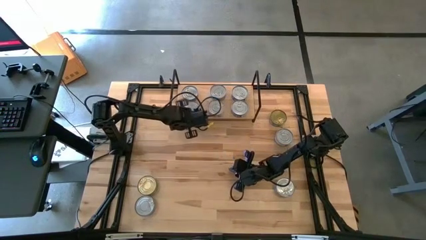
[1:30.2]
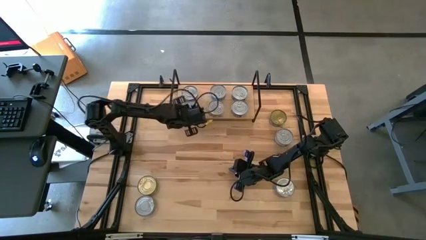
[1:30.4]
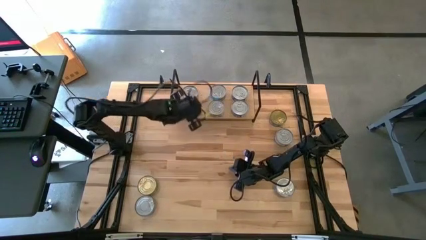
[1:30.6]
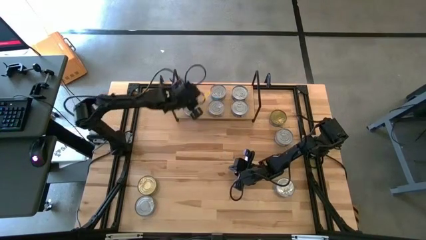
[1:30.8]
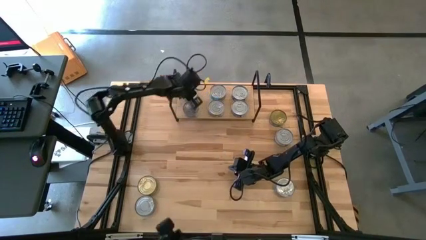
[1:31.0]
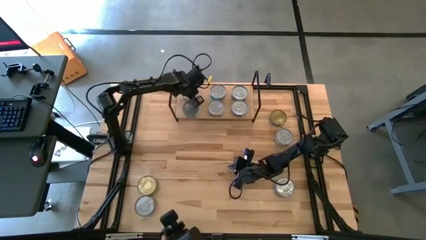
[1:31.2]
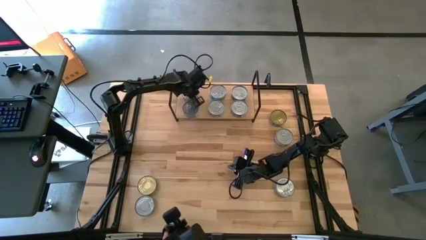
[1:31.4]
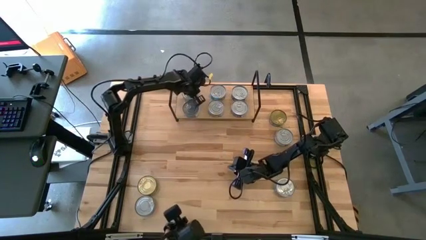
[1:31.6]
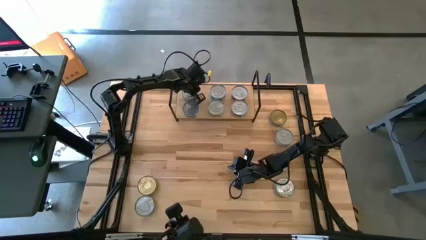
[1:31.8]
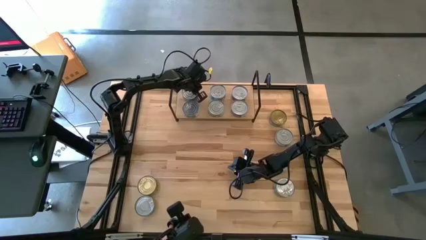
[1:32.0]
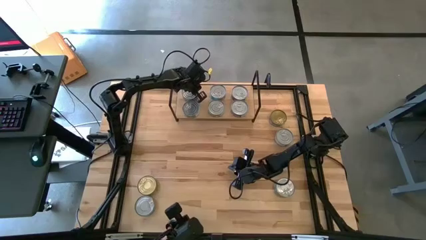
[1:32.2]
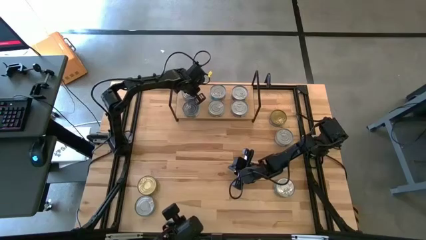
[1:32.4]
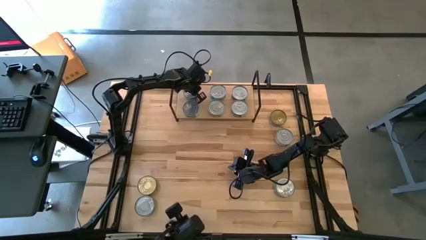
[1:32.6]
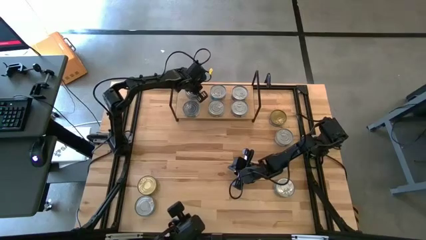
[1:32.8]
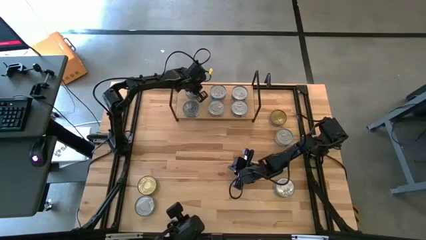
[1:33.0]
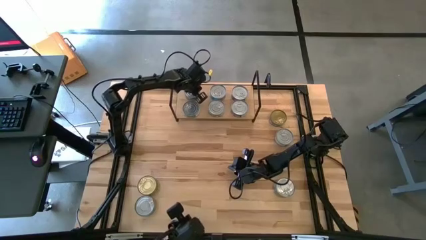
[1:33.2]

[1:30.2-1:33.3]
Task: Stack canned seafood by type on shelf
Adjust the green tuna can on the shelf

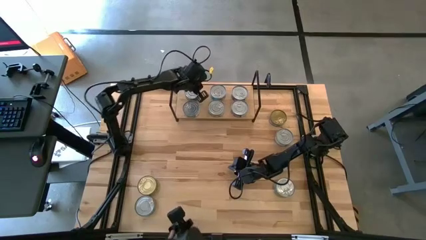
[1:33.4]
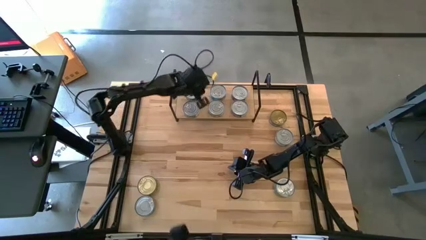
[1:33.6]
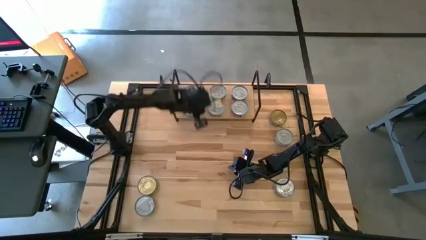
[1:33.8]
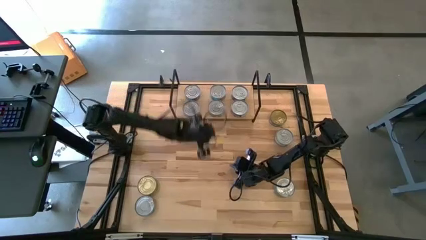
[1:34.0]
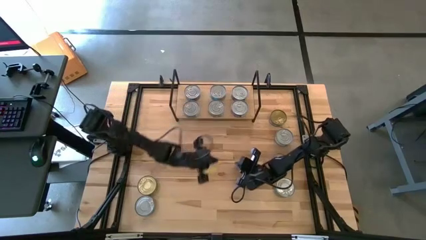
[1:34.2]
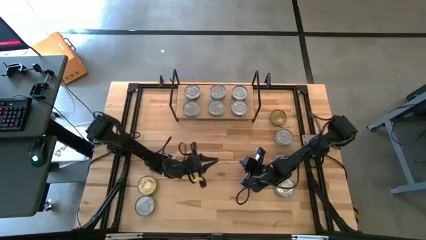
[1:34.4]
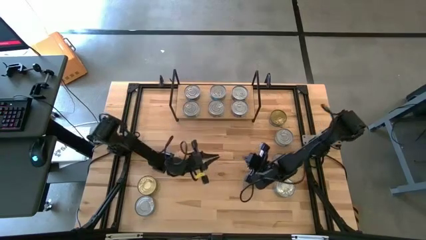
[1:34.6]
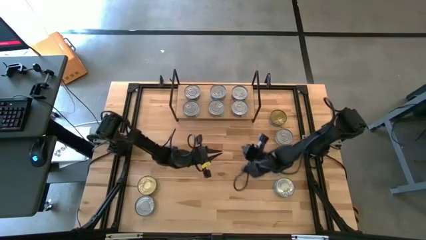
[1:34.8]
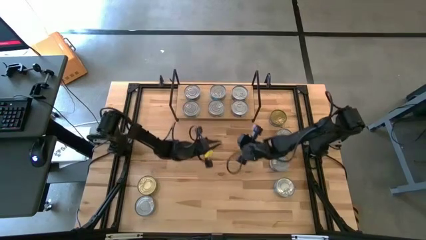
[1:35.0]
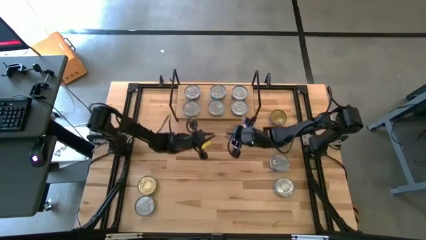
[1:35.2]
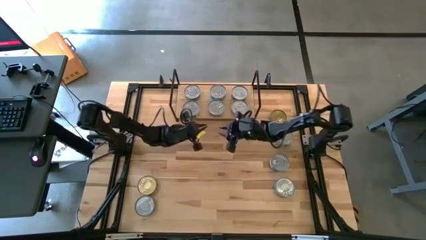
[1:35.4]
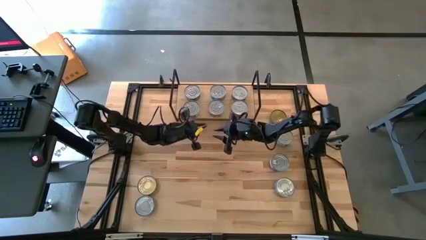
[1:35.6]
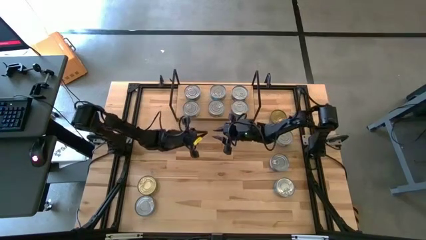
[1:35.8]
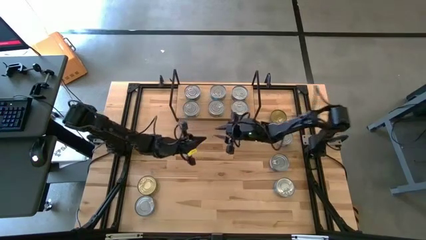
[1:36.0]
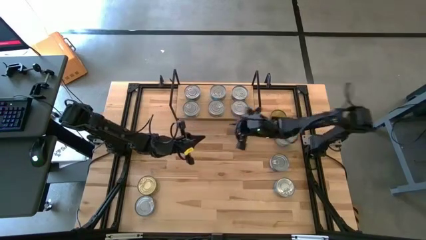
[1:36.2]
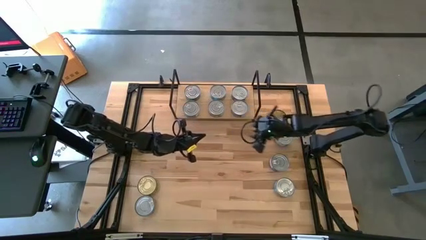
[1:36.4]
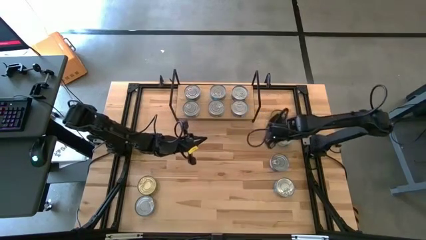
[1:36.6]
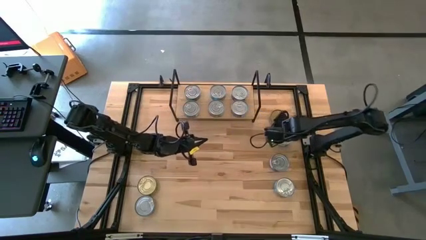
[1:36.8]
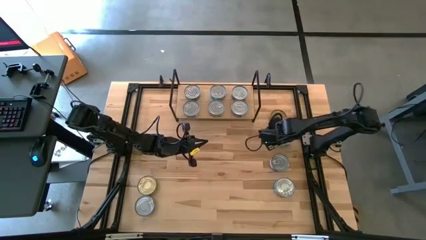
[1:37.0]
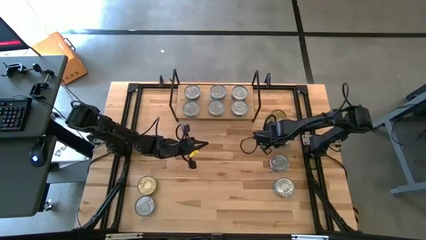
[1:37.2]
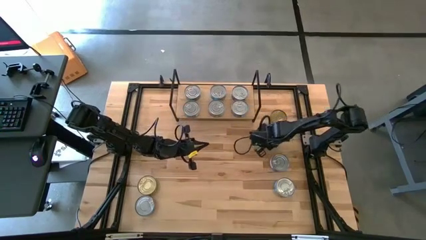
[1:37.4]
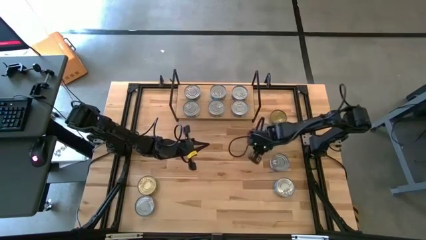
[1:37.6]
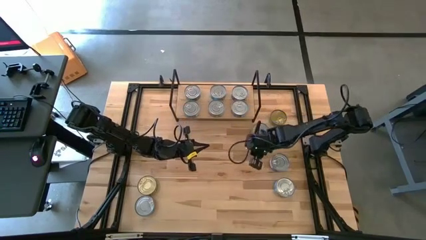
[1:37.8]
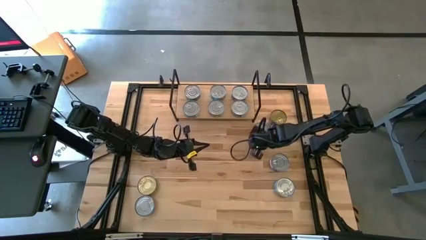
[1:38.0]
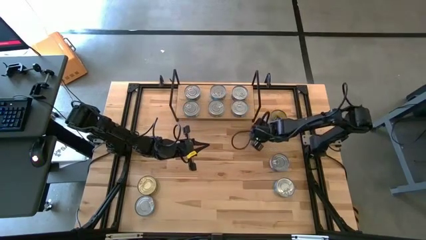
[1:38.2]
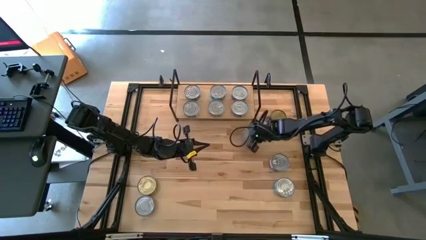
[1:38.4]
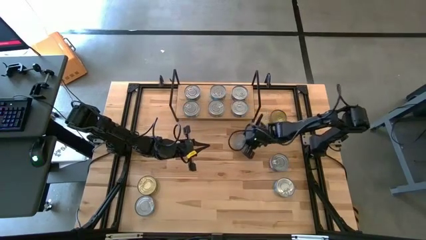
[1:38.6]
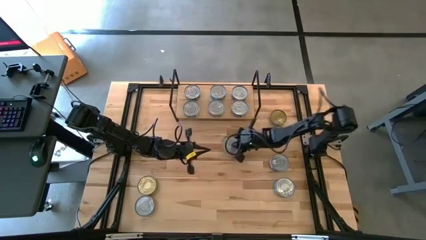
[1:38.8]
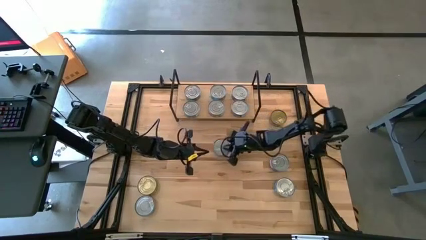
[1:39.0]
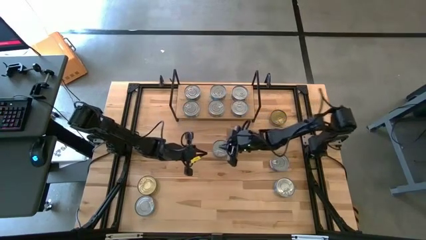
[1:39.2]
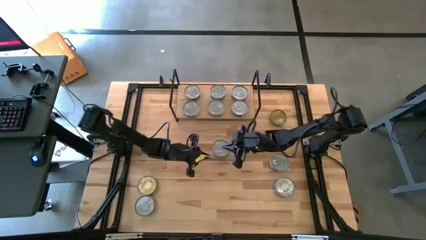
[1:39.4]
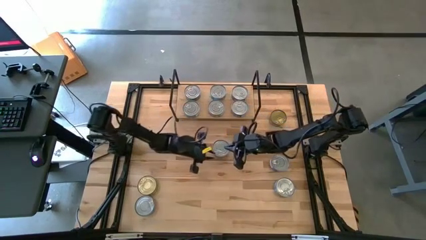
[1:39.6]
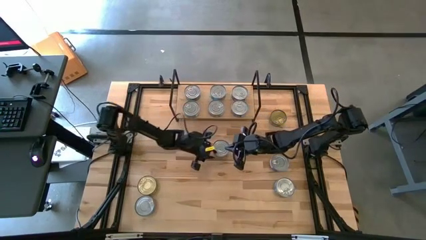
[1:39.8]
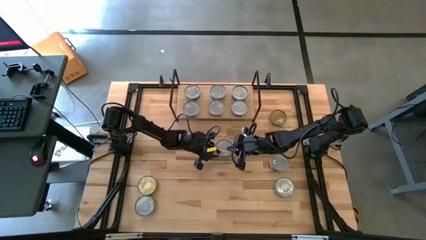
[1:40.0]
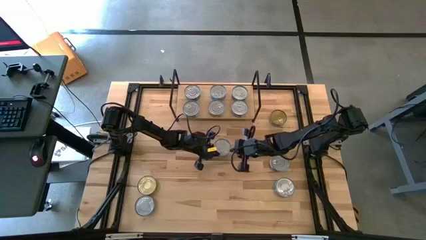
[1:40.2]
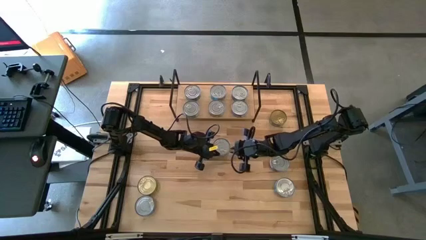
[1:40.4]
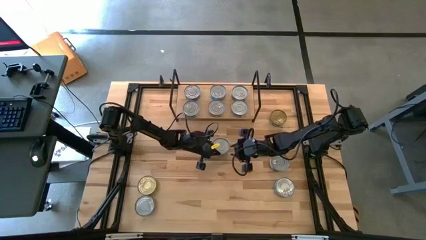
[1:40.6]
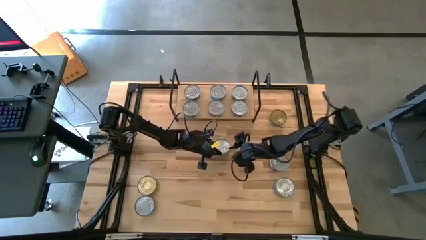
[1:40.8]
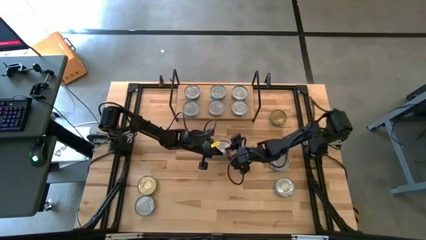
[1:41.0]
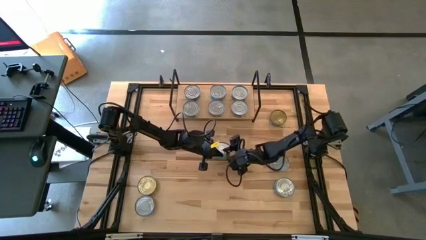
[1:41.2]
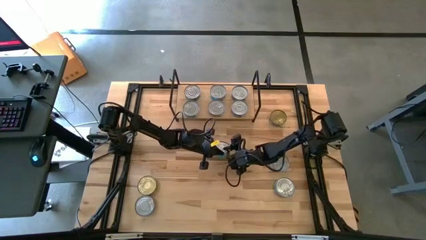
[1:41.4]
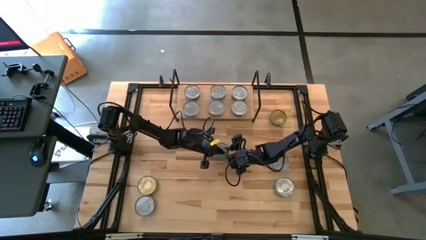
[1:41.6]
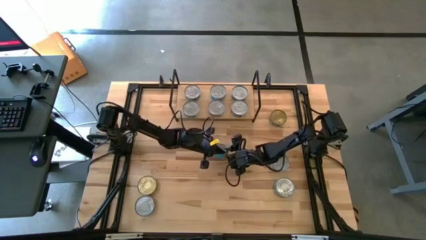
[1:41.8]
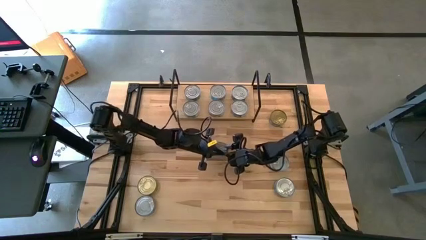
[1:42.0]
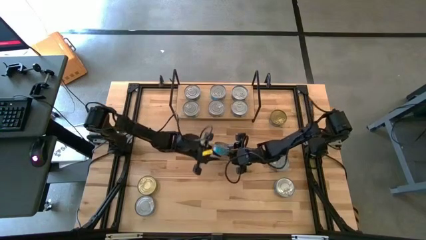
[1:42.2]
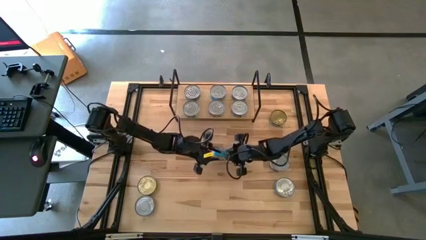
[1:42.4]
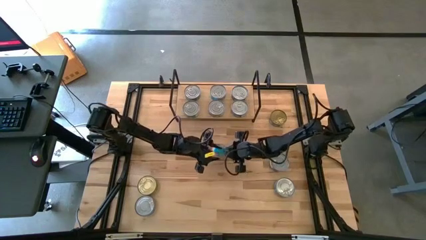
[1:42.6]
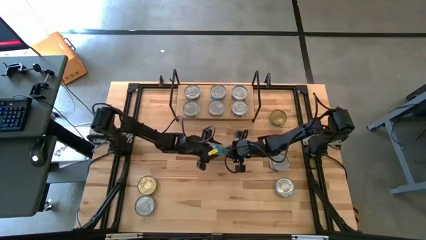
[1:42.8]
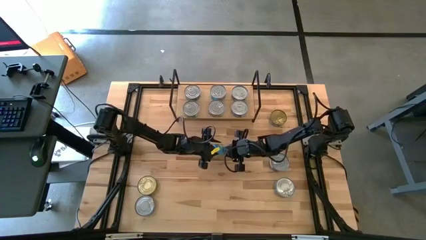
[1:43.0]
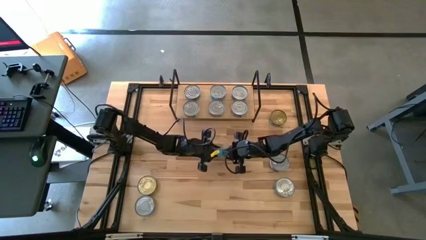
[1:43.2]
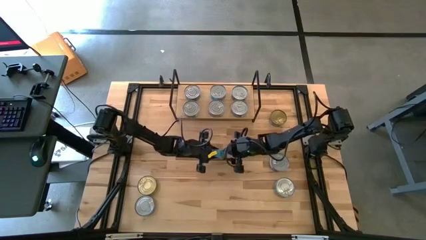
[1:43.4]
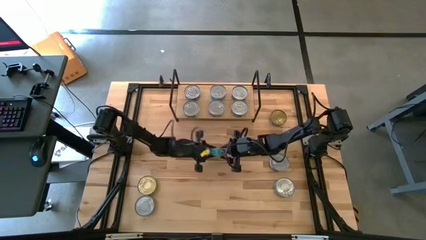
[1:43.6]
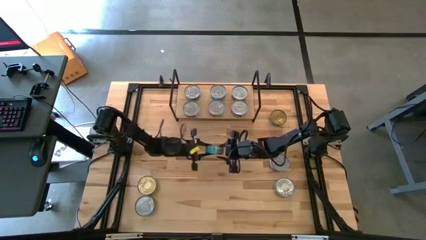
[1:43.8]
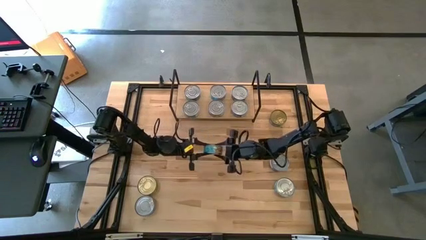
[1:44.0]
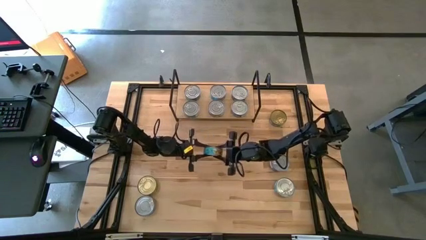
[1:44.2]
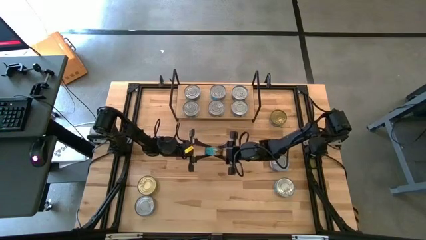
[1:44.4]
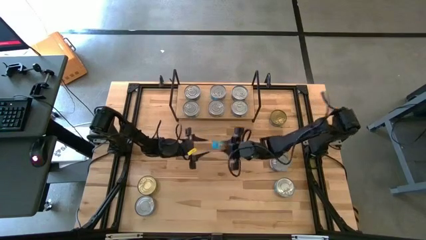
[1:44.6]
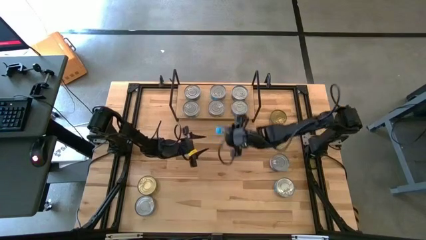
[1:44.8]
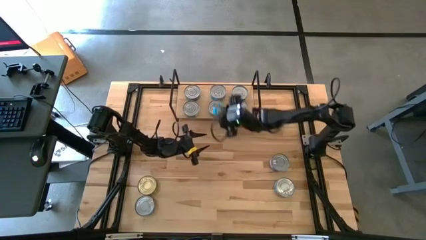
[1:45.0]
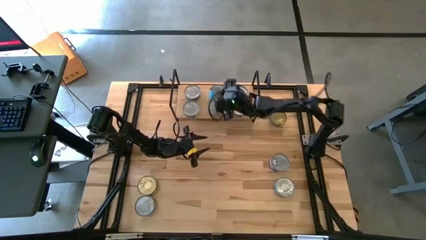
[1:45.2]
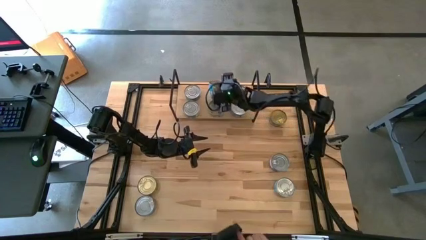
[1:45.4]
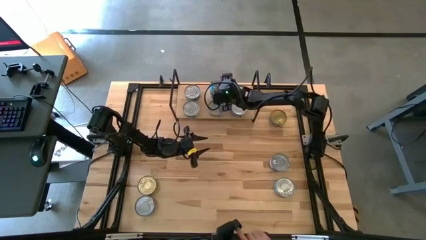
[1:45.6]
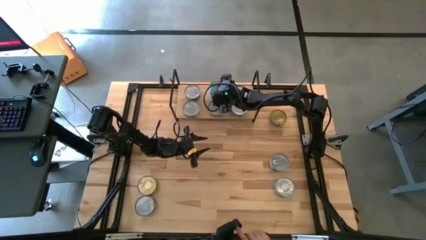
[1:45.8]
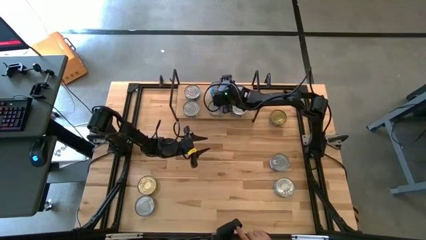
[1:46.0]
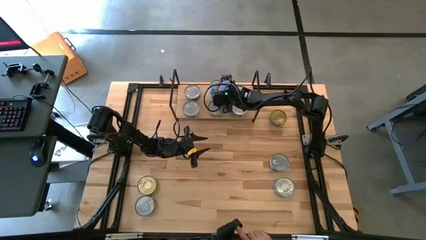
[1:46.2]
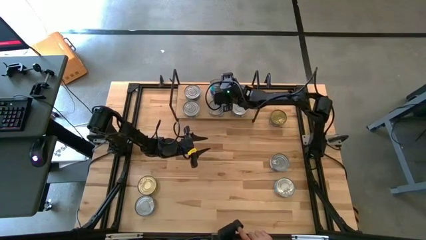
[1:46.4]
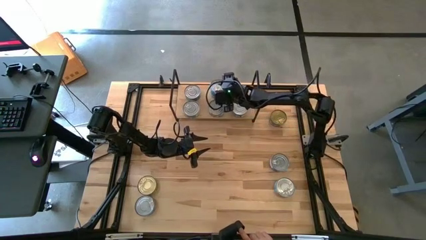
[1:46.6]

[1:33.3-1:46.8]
Stack the light blue tuna can on top of the light blue tuna can on the shelf
